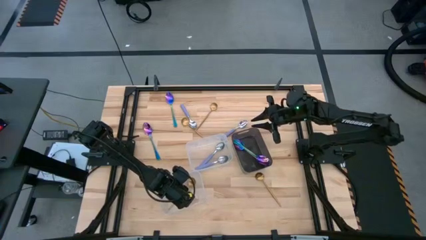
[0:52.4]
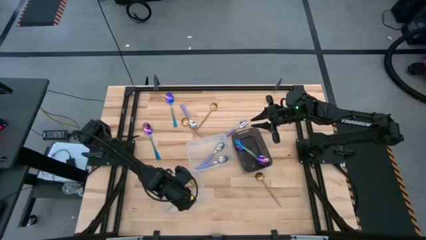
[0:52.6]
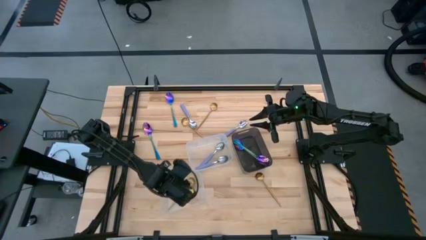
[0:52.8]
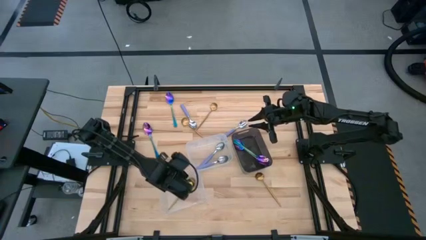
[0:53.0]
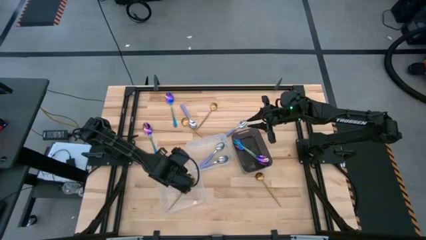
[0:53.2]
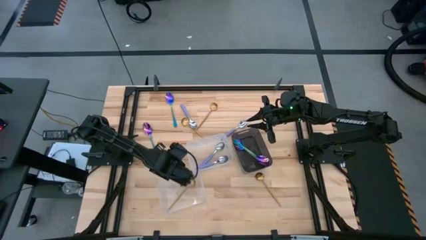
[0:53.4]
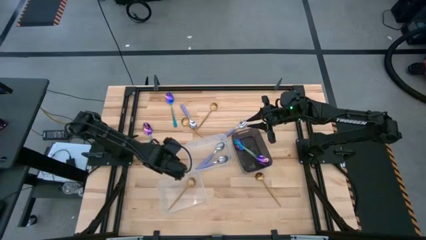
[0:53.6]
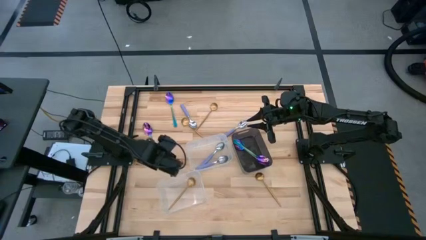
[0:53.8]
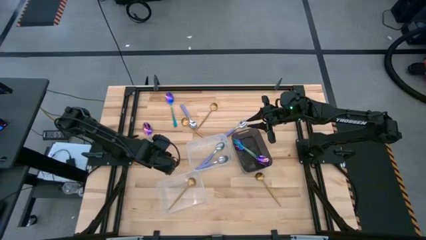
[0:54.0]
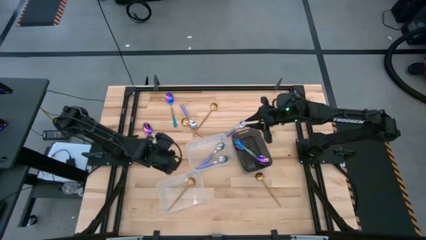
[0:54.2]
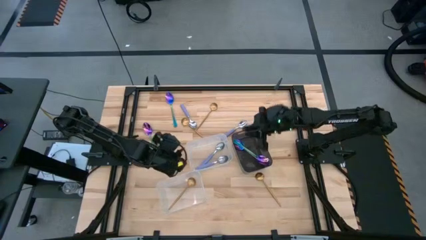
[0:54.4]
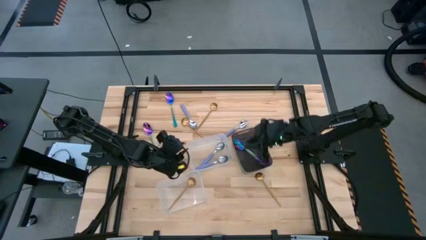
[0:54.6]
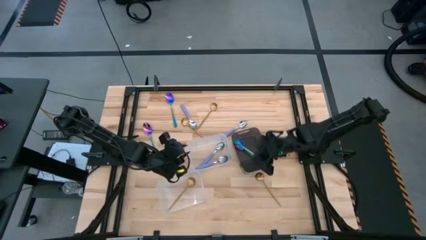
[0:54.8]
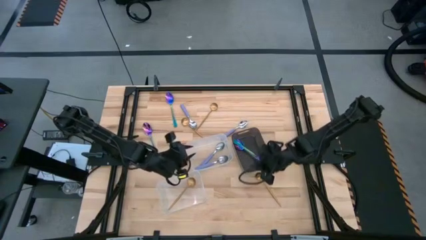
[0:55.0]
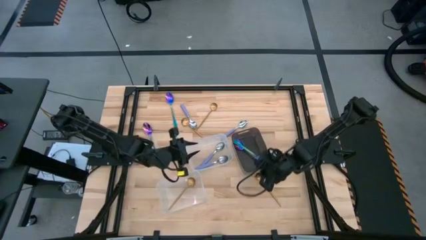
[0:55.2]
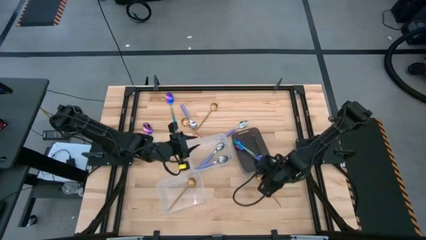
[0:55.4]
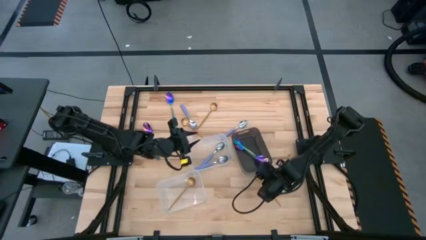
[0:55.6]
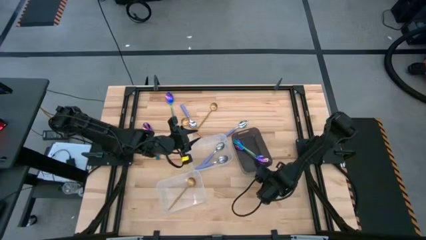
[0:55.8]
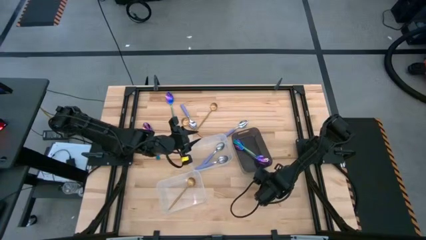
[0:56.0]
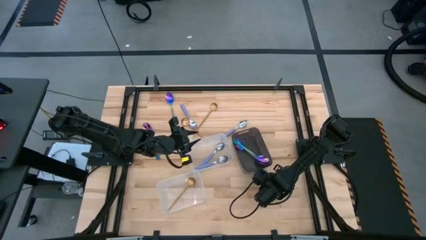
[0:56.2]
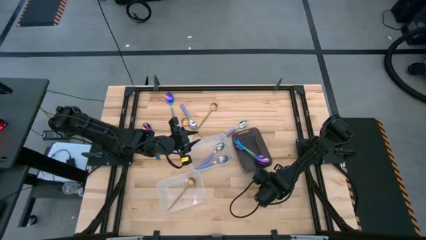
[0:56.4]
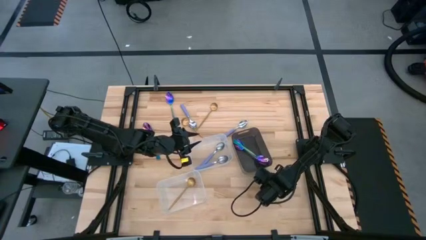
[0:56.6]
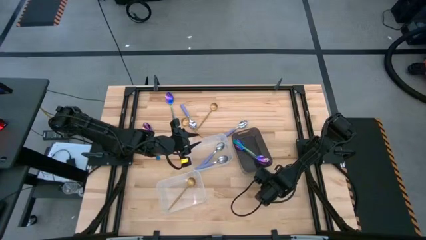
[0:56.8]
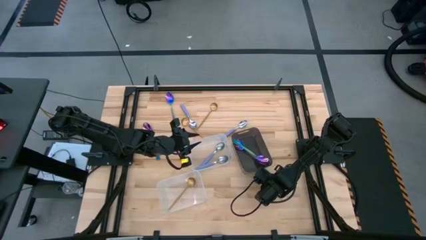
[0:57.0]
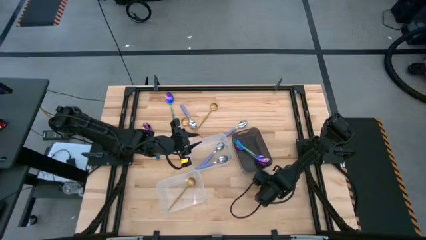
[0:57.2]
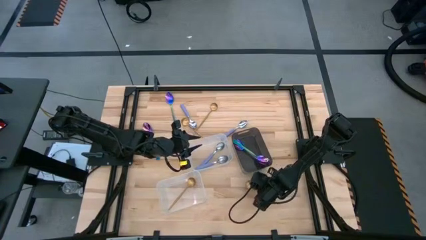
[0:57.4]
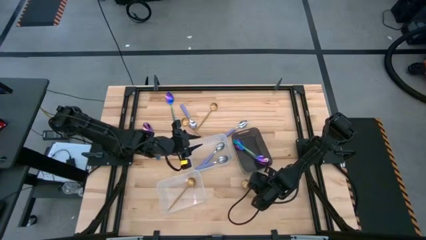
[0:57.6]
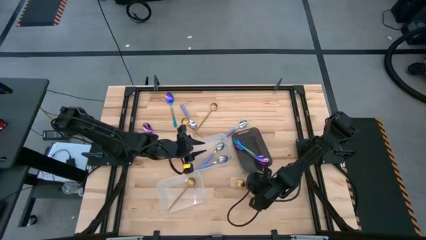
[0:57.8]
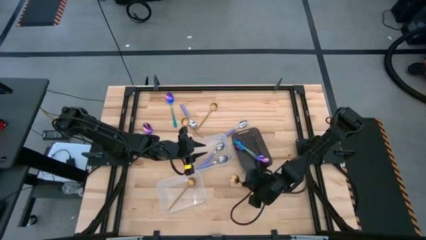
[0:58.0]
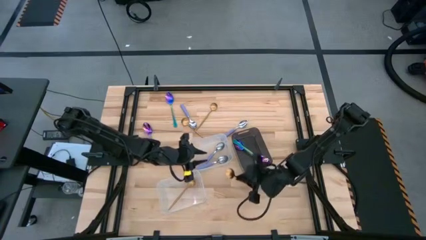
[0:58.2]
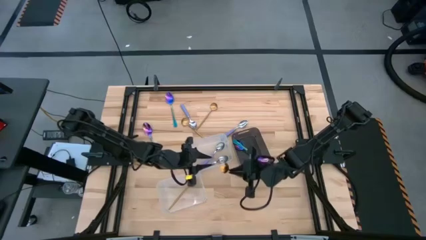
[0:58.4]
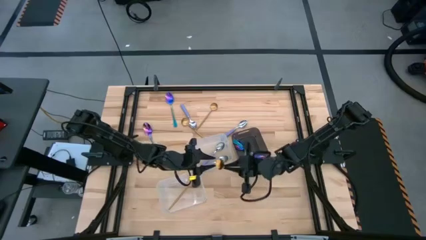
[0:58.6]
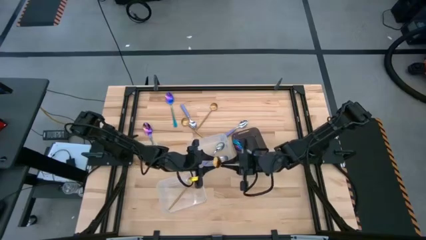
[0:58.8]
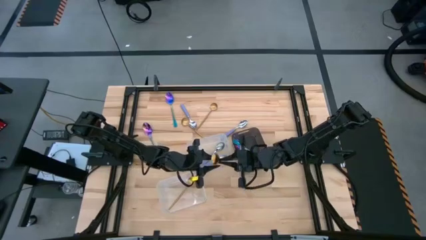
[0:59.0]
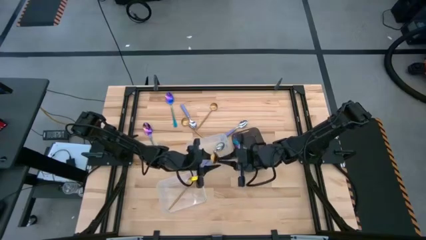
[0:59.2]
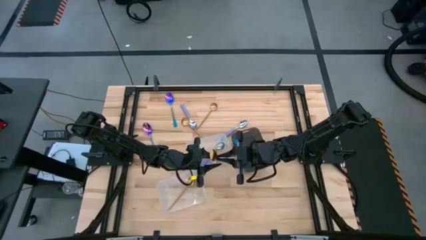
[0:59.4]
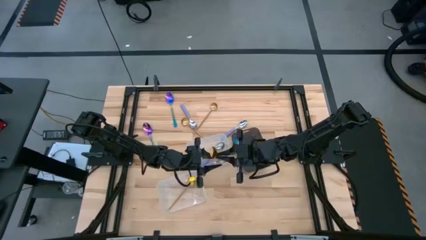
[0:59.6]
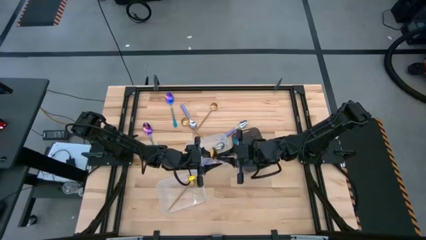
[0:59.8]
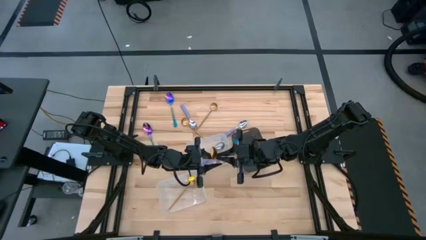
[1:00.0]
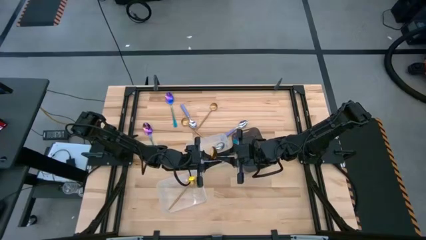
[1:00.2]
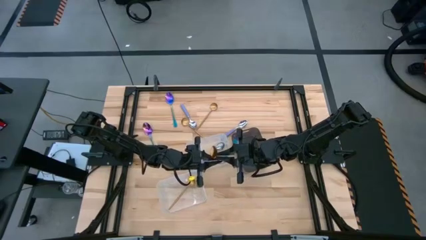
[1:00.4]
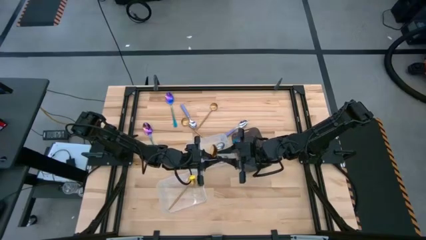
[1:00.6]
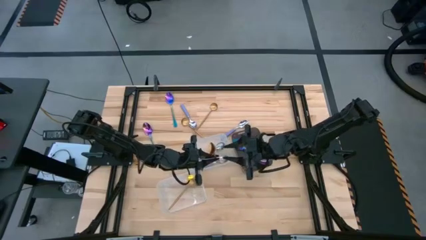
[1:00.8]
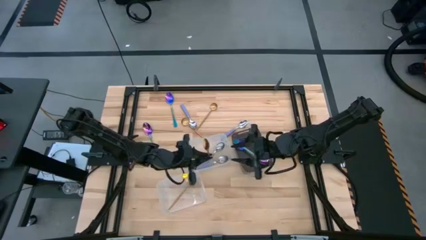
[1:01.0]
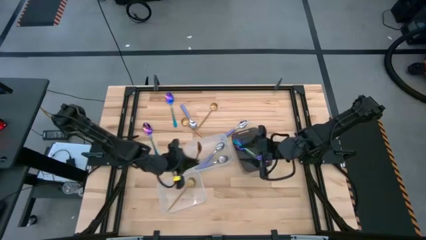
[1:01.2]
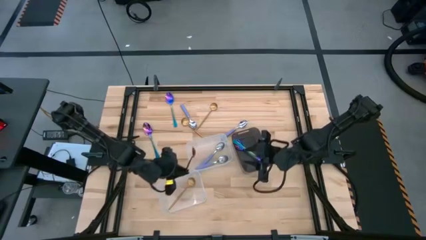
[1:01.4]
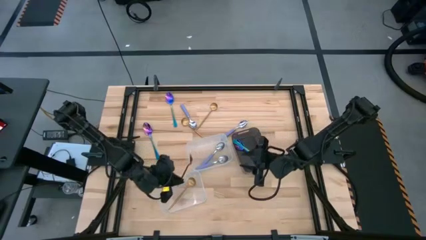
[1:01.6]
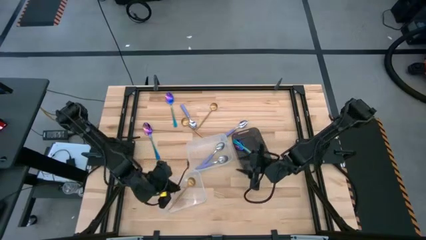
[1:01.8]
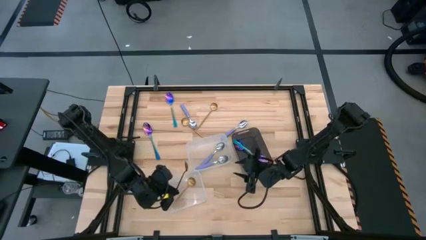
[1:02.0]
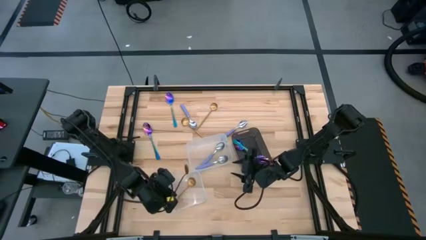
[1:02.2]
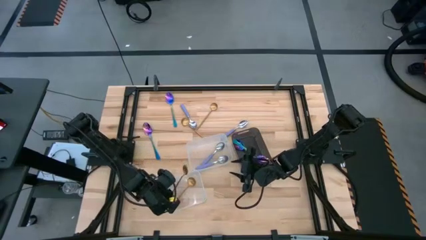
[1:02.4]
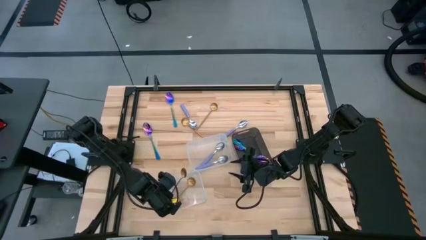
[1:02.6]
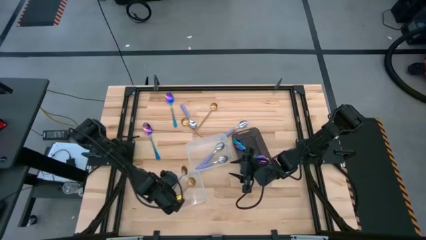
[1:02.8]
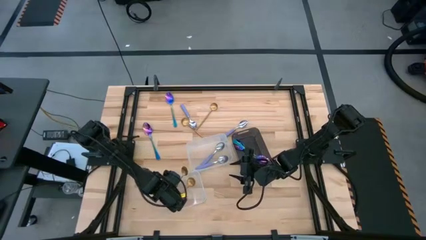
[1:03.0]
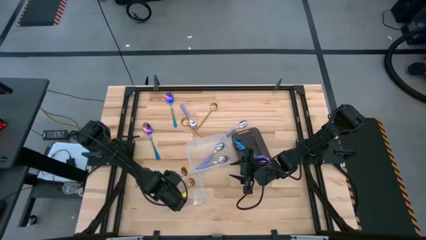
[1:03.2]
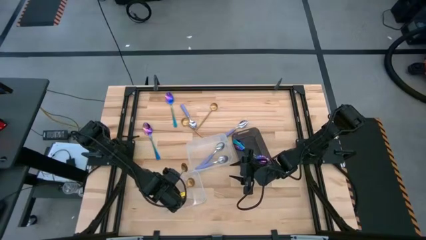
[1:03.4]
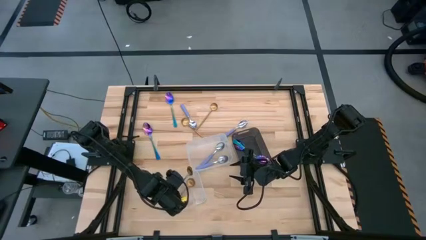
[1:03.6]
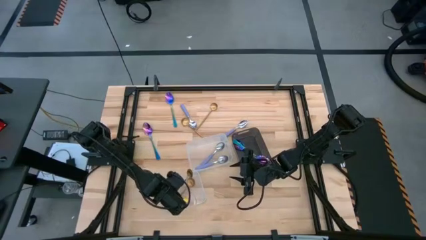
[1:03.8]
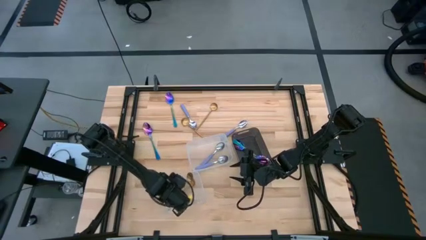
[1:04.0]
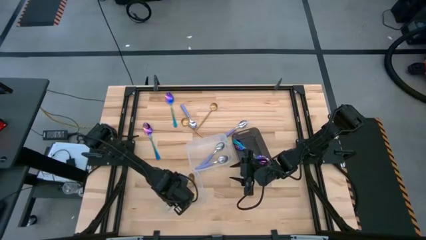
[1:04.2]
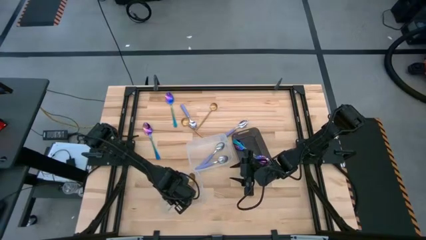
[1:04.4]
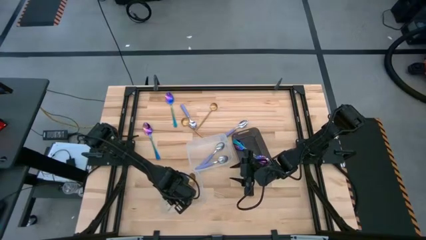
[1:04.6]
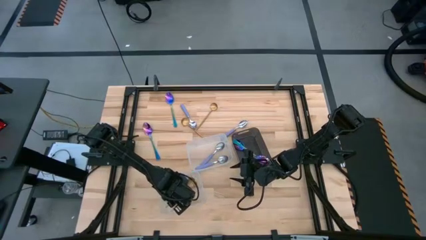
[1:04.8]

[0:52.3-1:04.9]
Task: Sort silverware by color (type)
Put the gold spoon into the bottom transparent bin
